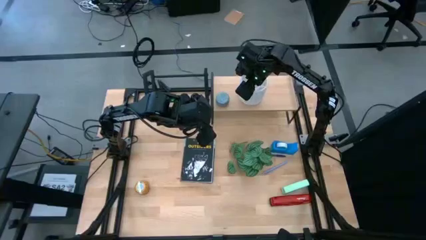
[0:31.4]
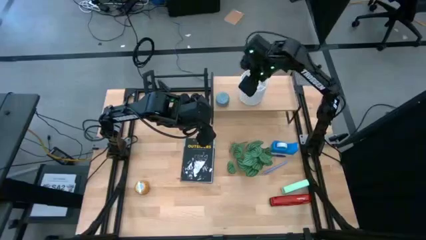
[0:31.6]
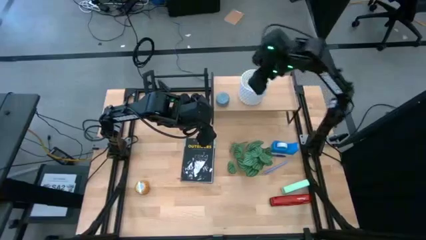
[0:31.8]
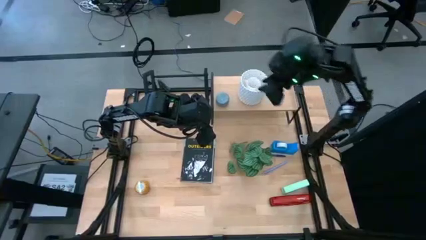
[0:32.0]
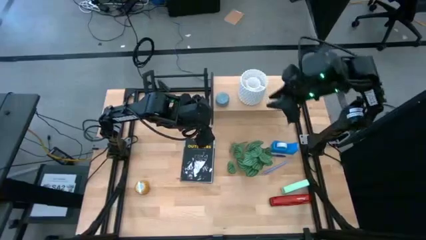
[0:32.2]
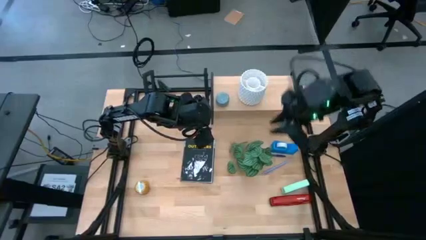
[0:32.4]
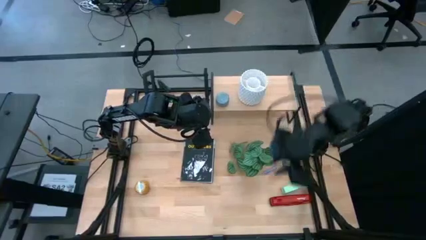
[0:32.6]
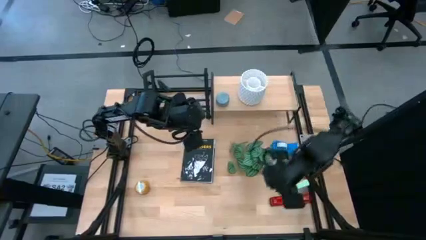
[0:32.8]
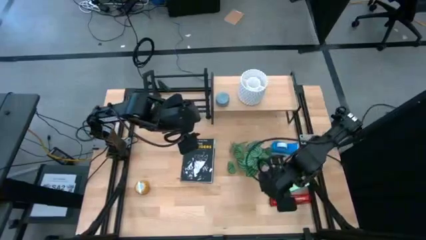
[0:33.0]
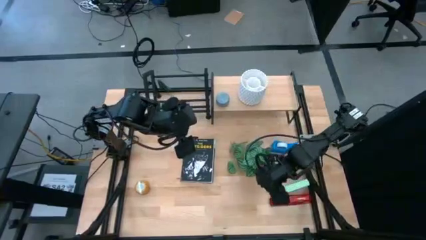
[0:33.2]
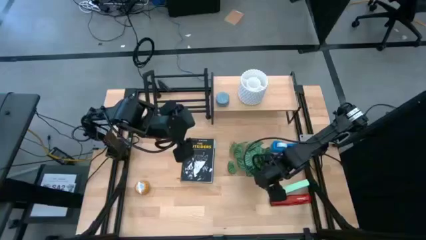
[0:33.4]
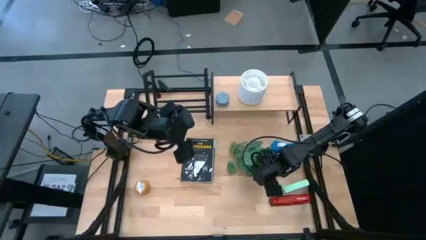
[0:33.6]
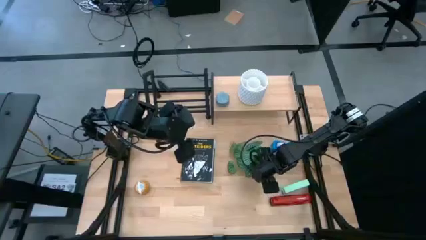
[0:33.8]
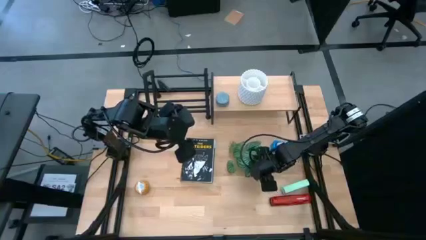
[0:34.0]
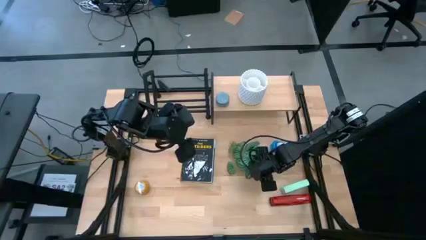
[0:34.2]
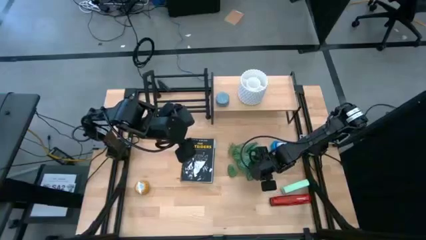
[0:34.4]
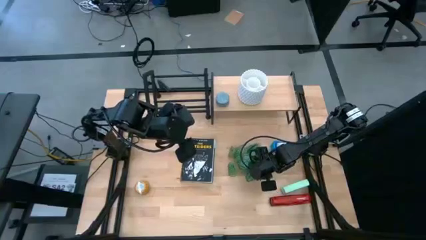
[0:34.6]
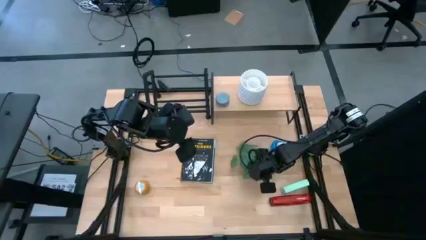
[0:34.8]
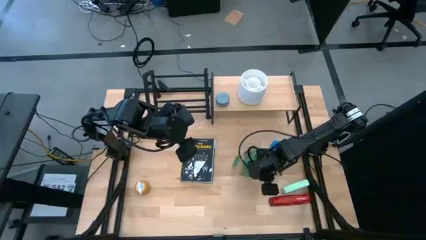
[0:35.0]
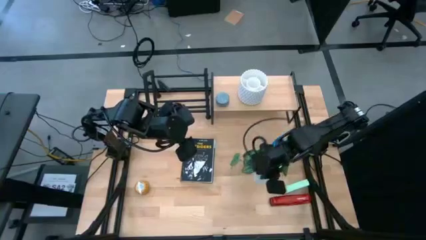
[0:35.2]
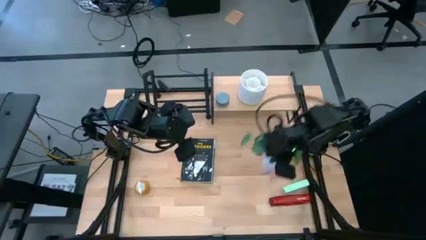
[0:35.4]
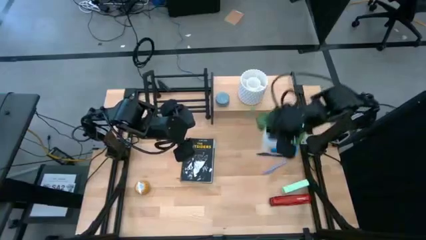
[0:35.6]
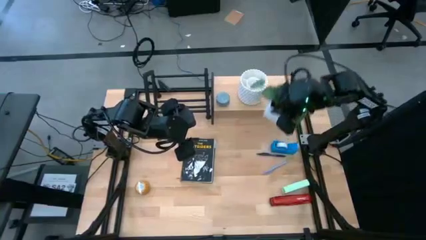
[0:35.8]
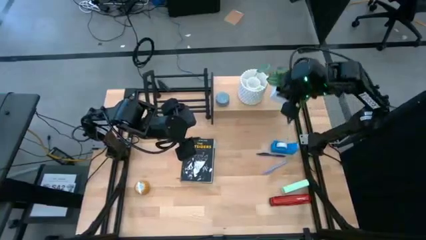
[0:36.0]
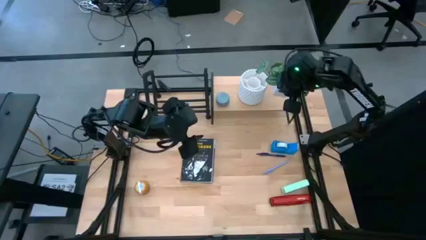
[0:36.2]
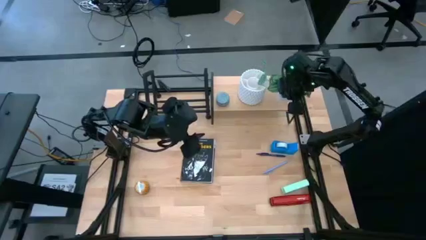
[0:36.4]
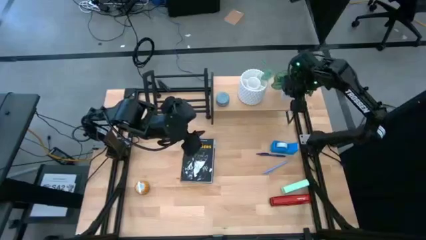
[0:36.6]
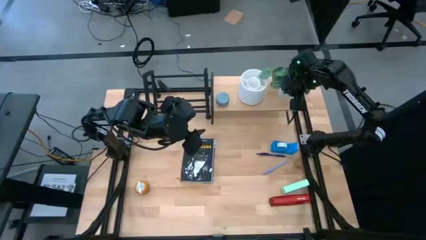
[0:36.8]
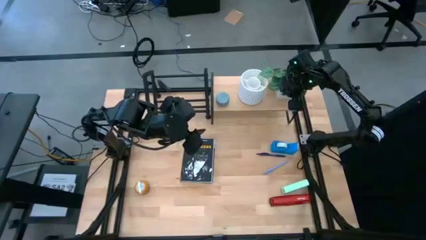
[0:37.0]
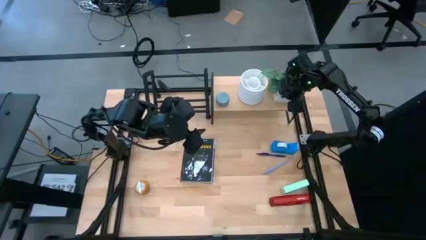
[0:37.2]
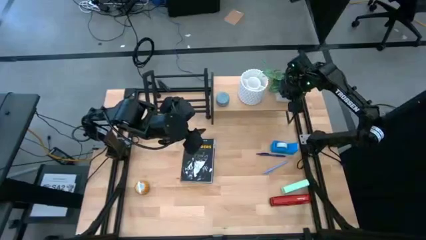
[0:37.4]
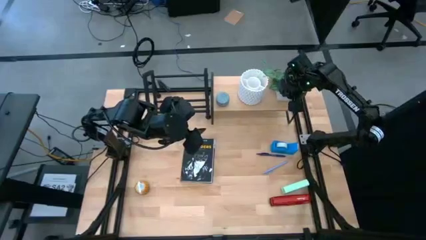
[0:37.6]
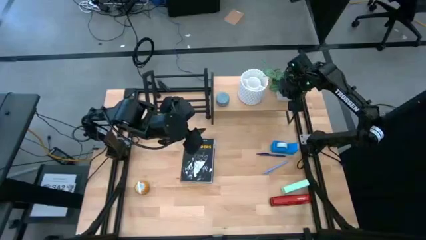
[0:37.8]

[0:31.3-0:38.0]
Task: Stock shelves
Put the flower pot on the shelf

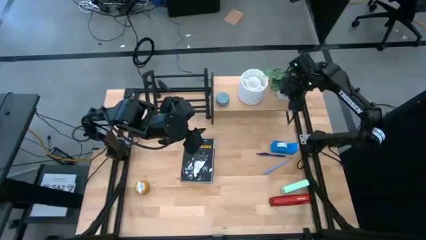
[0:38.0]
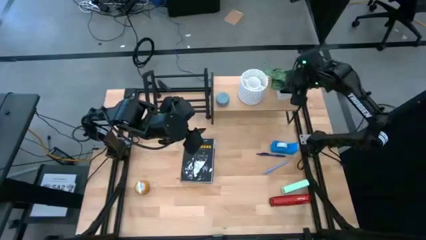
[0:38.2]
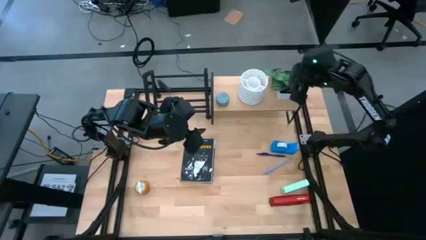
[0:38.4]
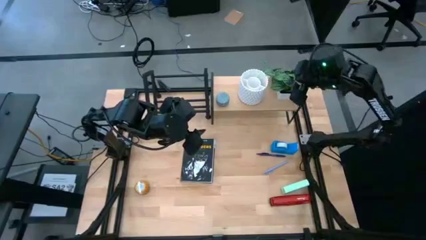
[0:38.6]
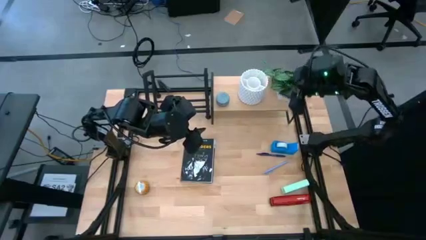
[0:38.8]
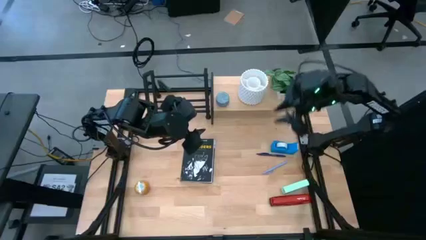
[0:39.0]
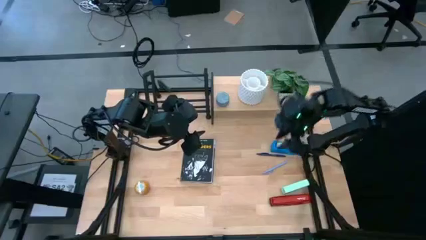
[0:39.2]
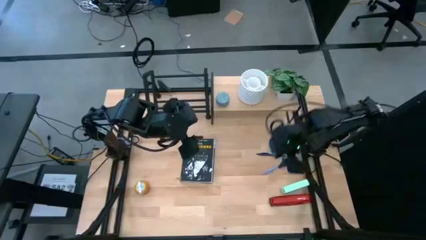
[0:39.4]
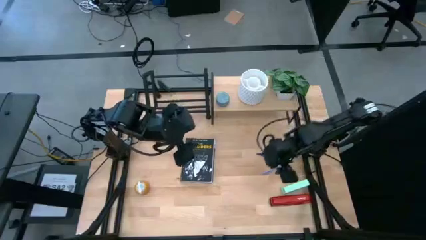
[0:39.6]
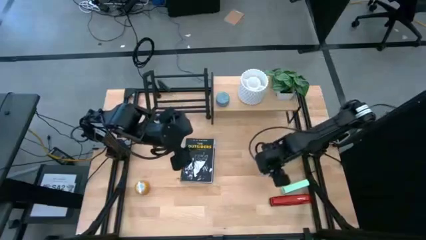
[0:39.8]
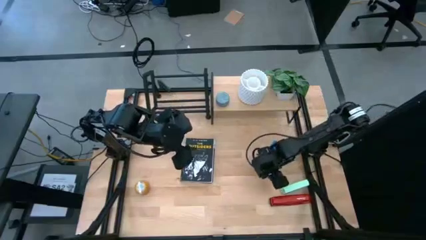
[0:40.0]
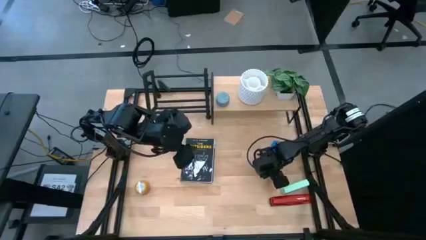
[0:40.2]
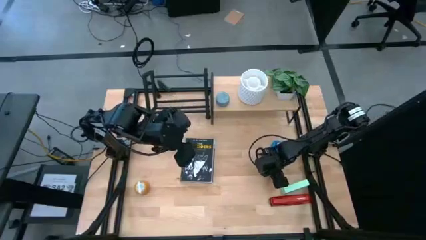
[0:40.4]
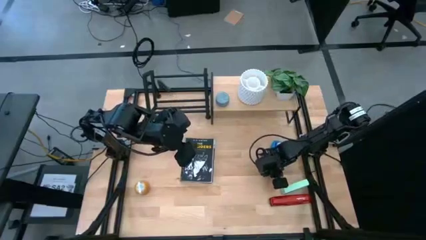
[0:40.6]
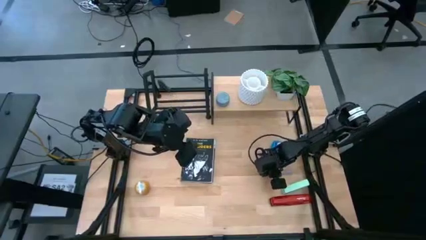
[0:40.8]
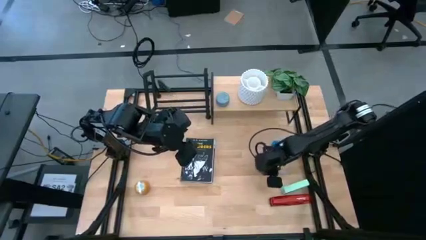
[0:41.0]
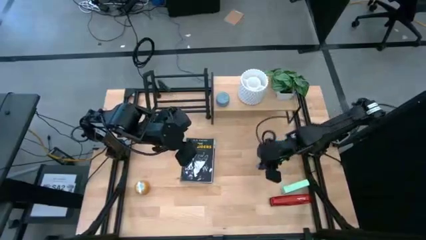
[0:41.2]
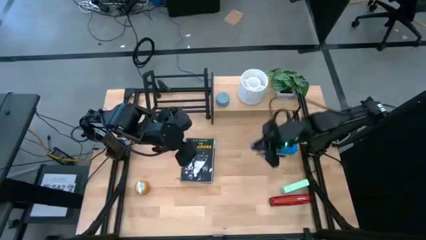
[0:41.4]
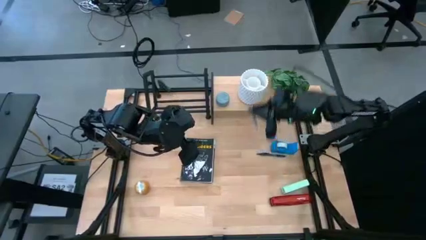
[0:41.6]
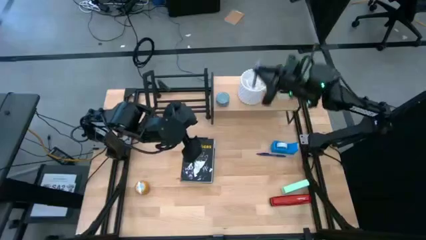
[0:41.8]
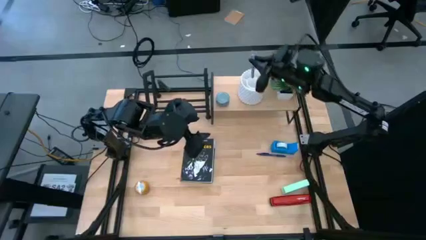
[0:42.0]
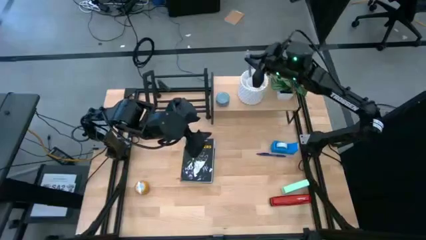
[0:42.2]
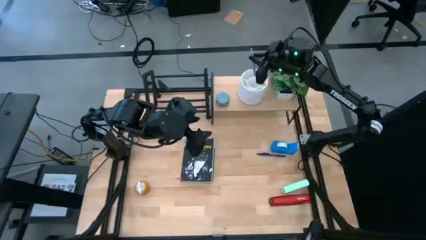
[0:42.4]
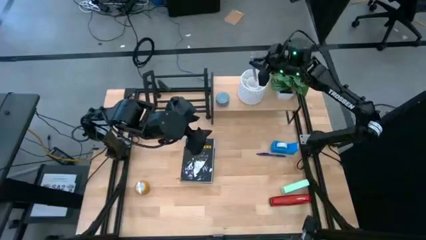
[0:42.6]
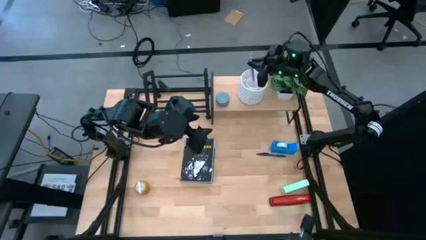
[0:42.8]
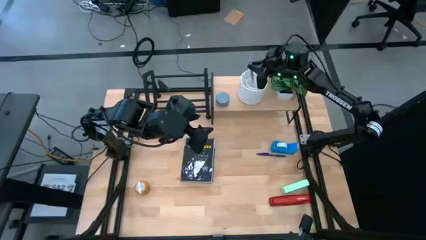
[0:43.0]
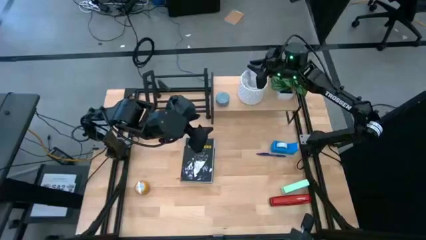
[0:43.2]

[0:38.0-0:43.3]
Put the purple pen into the white pen holder on the shelf

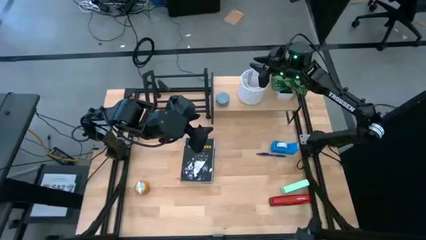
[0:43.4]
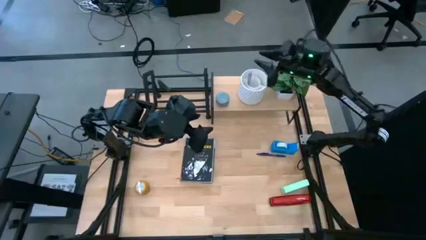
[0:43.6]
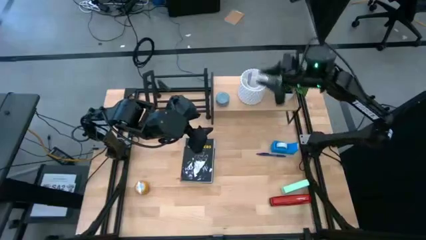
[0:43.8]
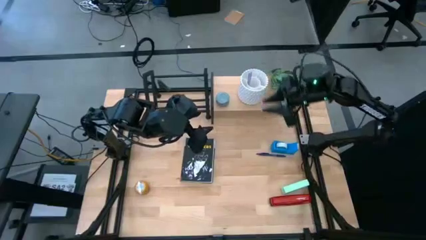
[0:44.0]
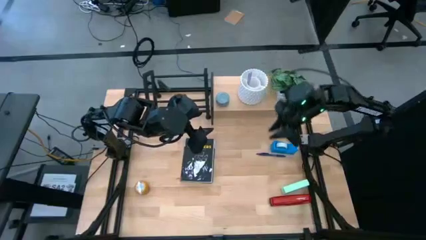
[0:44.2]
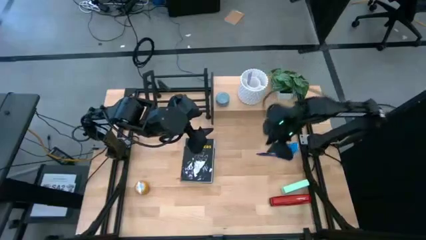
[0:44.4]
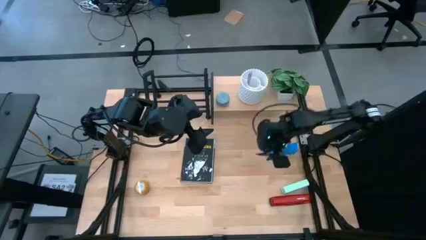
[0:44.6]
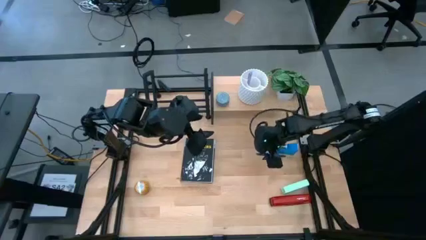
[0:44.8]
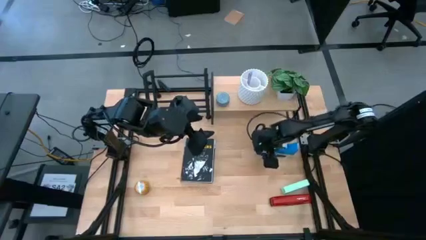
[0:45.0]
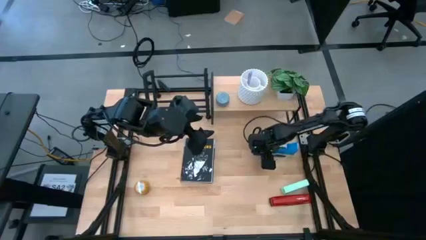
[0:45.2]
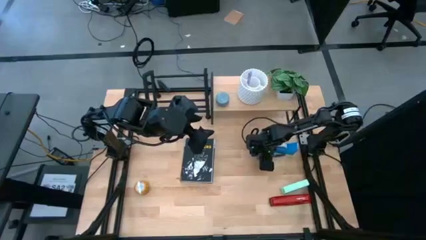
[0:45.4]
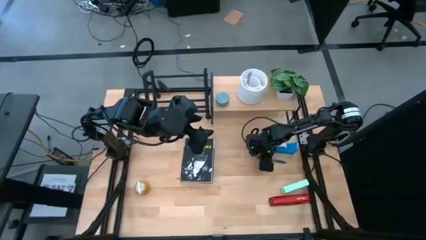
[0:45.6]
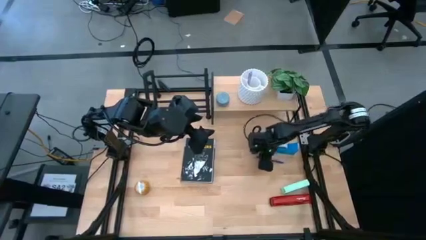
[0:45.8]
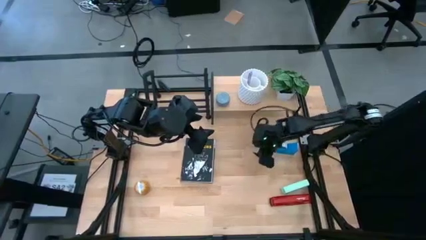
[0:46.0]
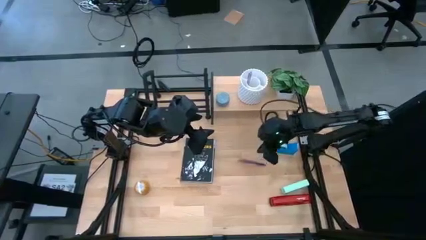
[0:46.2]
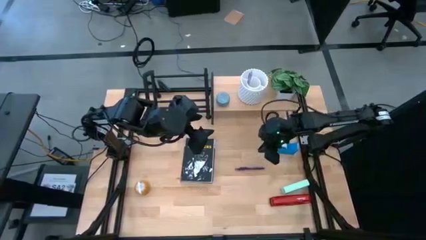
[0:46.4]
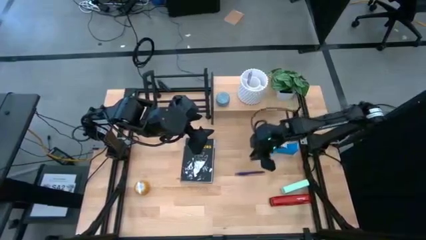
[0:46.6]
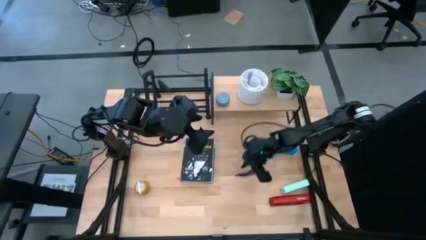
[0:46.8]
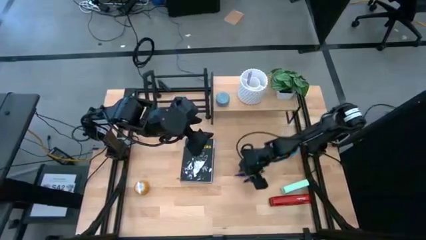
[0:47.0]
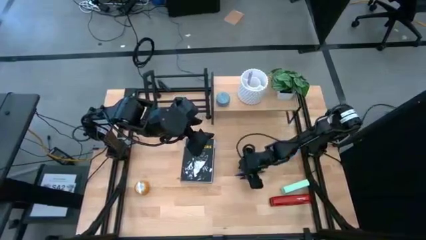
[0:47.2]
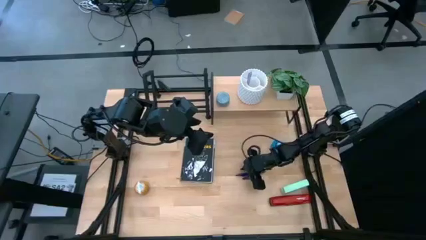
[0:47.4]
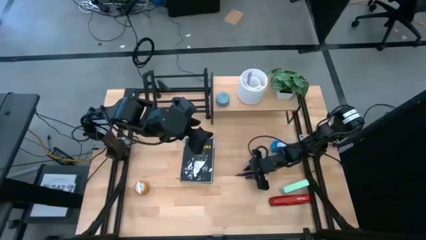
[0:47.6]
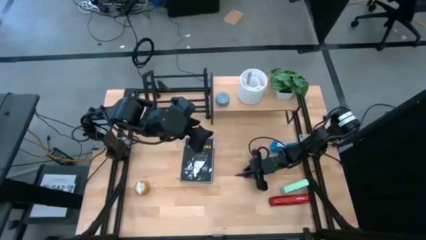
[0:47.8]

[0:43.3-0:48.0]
Put the violet pen into the white pen holder on the shelf
